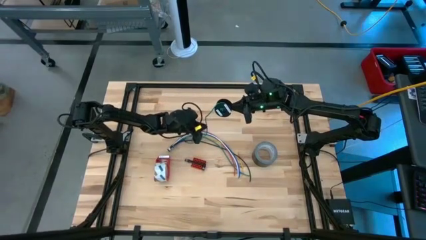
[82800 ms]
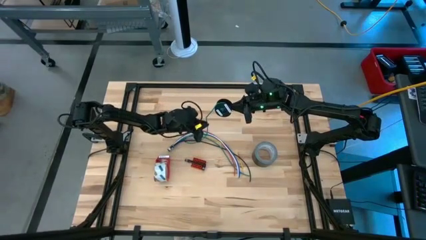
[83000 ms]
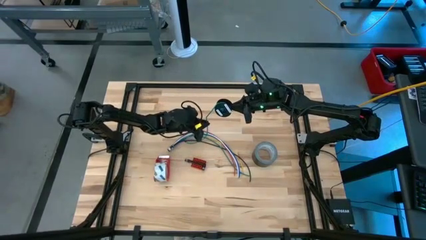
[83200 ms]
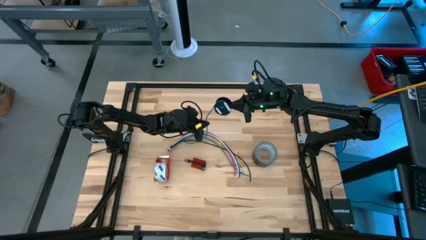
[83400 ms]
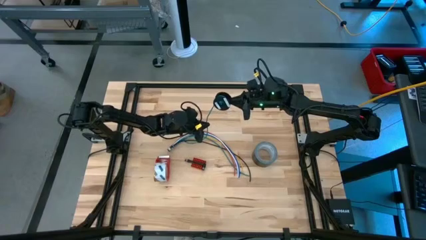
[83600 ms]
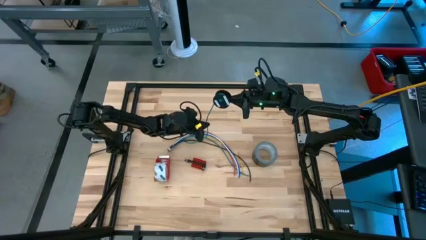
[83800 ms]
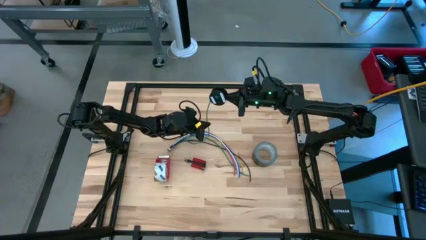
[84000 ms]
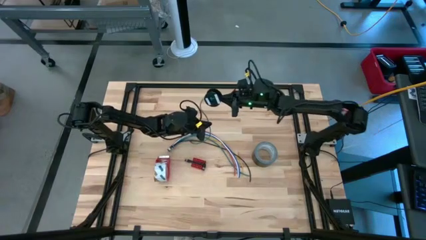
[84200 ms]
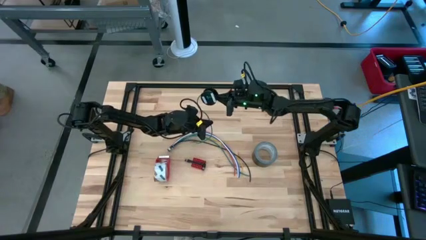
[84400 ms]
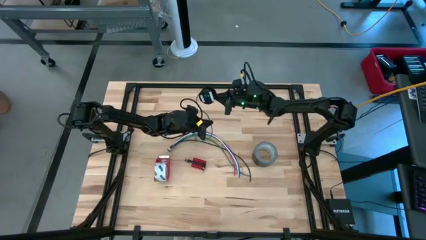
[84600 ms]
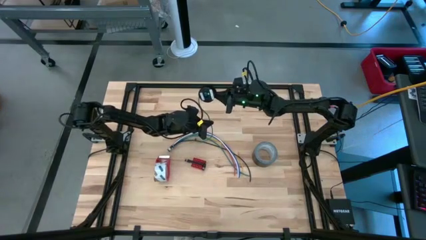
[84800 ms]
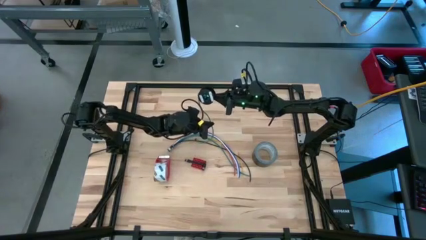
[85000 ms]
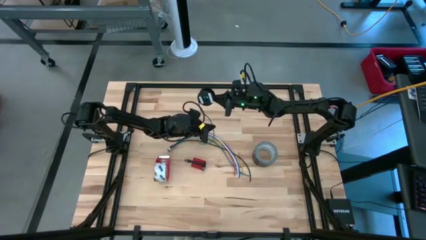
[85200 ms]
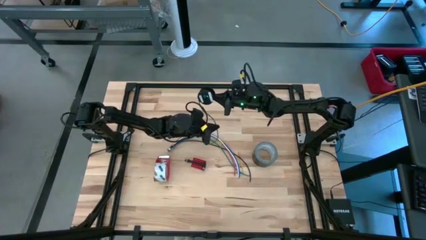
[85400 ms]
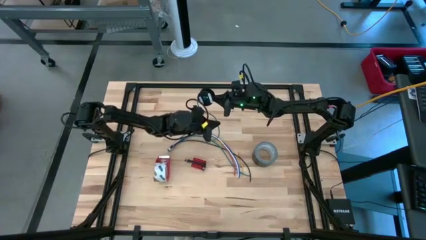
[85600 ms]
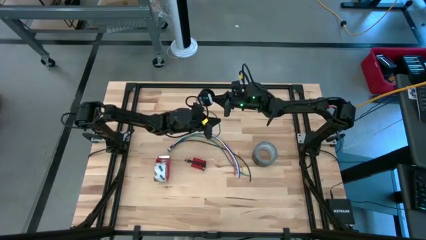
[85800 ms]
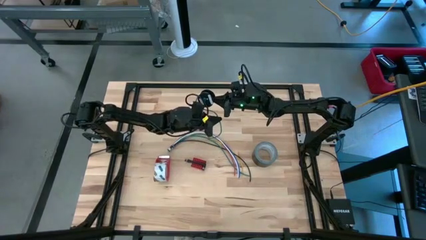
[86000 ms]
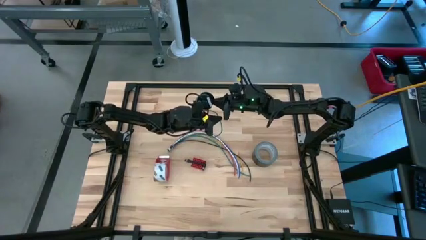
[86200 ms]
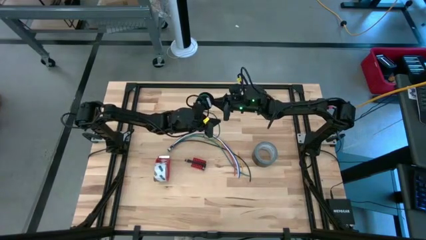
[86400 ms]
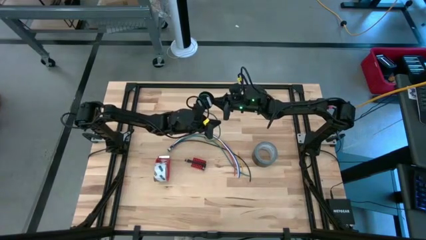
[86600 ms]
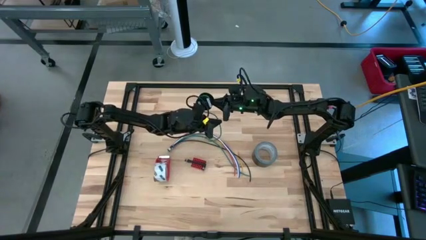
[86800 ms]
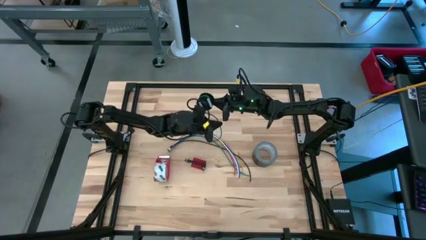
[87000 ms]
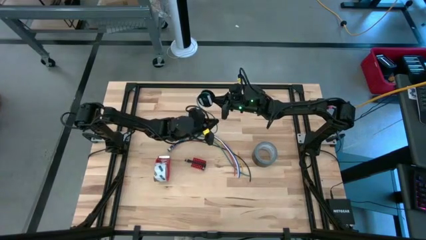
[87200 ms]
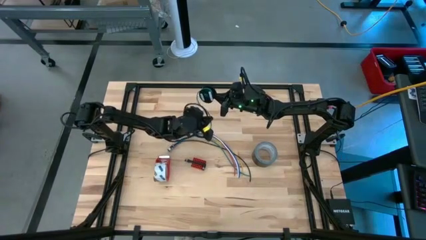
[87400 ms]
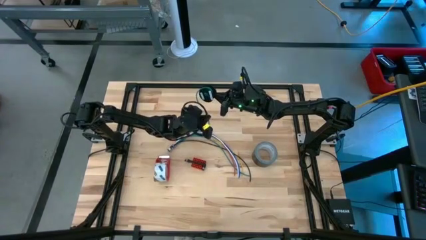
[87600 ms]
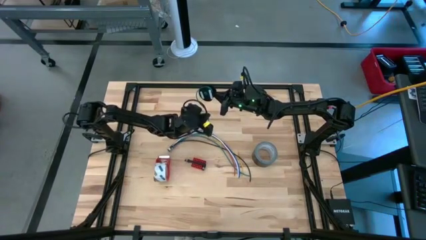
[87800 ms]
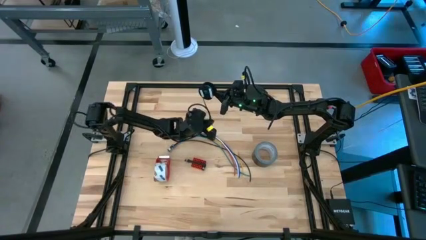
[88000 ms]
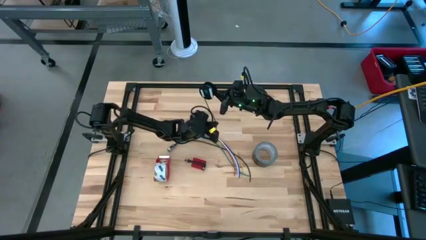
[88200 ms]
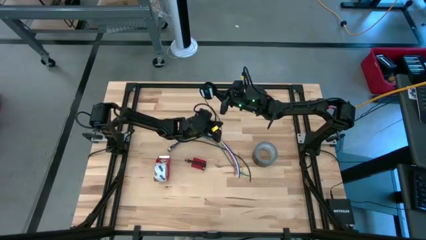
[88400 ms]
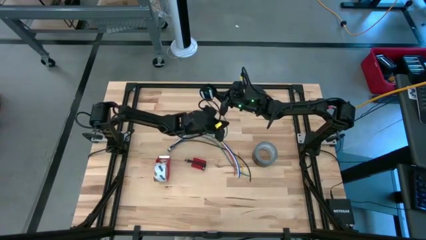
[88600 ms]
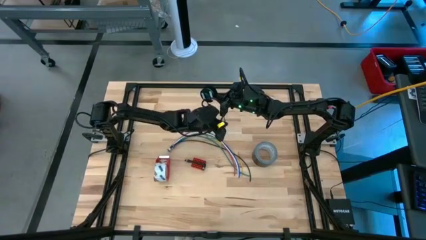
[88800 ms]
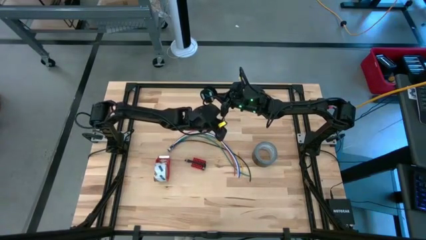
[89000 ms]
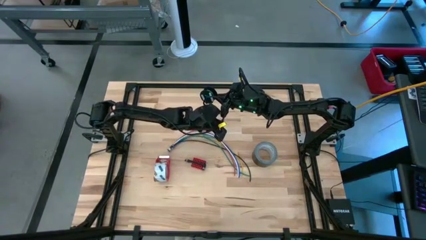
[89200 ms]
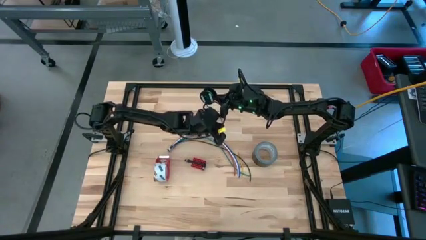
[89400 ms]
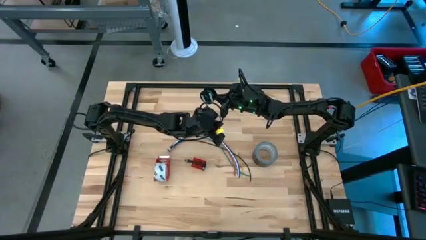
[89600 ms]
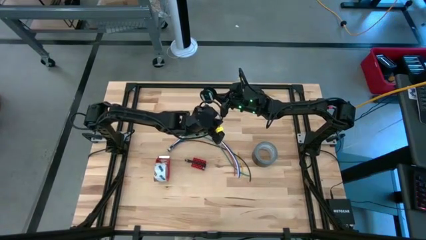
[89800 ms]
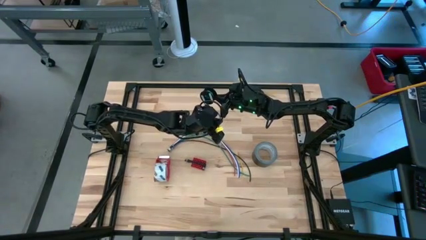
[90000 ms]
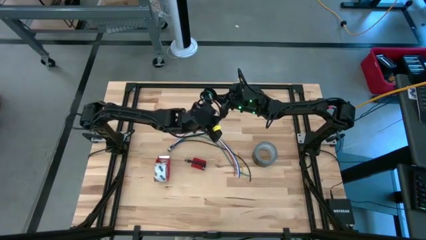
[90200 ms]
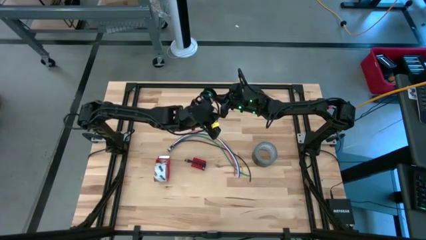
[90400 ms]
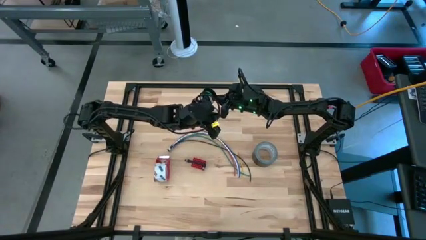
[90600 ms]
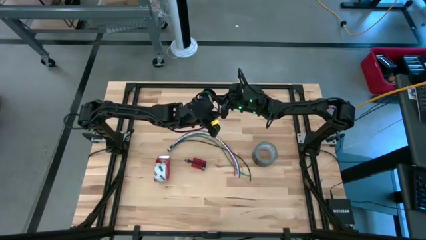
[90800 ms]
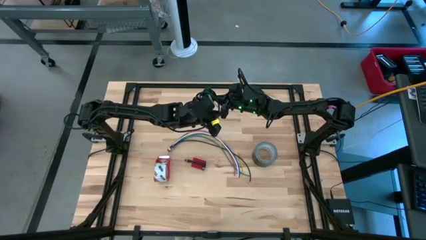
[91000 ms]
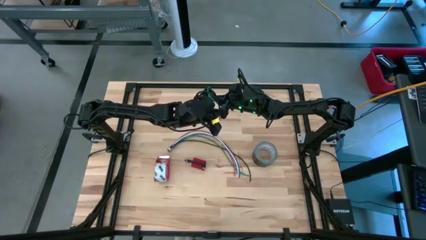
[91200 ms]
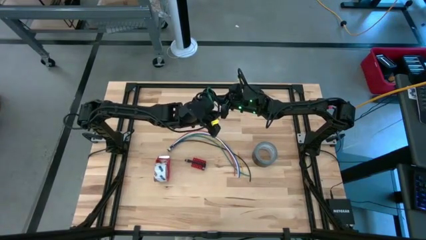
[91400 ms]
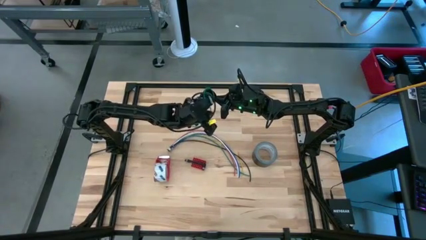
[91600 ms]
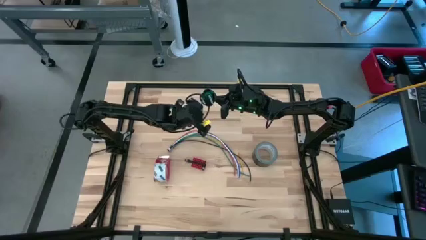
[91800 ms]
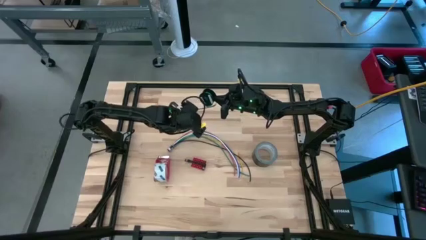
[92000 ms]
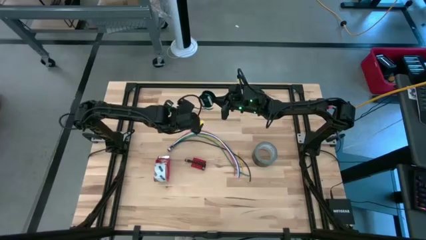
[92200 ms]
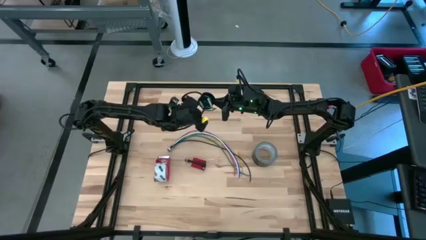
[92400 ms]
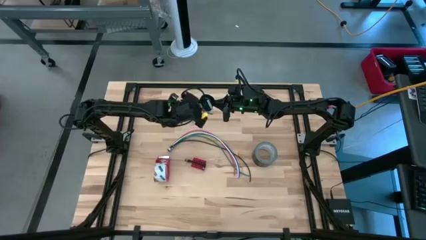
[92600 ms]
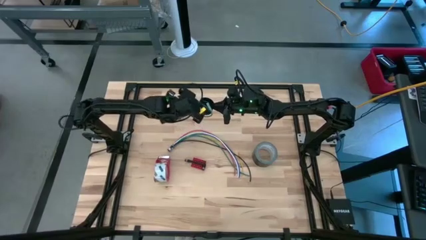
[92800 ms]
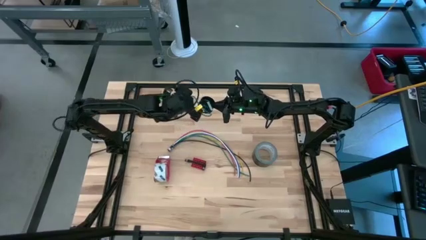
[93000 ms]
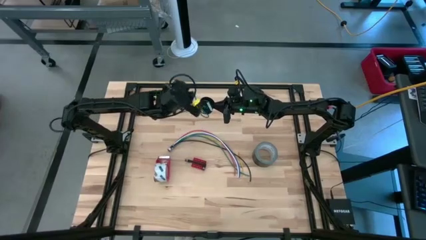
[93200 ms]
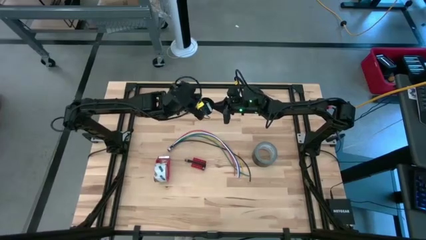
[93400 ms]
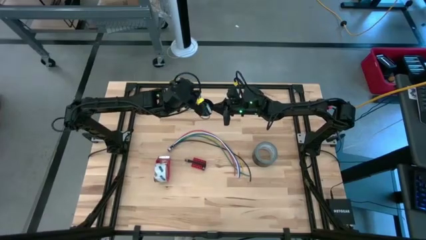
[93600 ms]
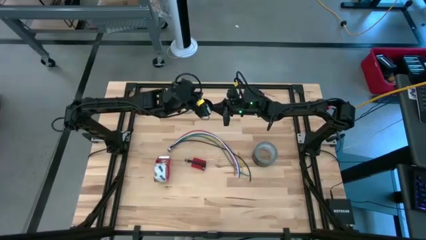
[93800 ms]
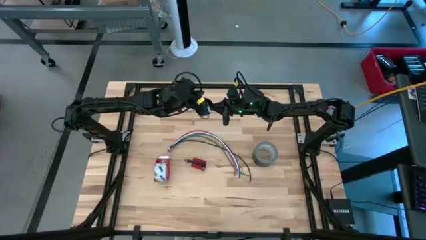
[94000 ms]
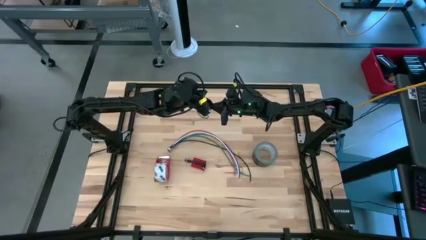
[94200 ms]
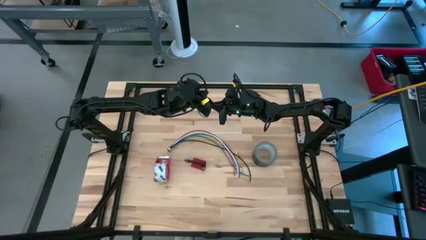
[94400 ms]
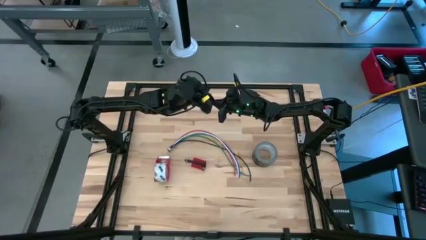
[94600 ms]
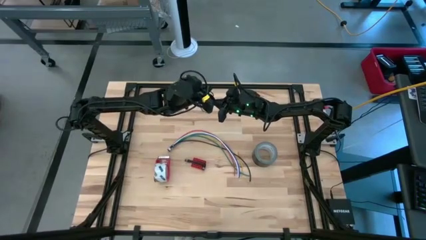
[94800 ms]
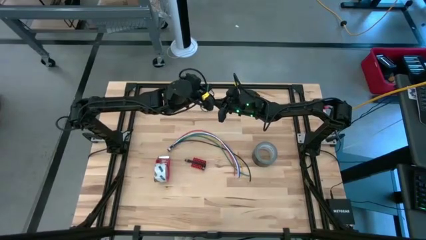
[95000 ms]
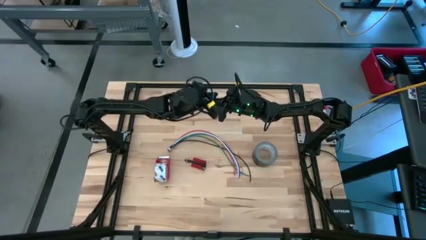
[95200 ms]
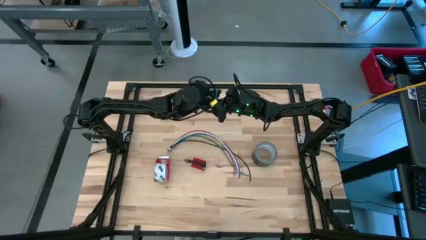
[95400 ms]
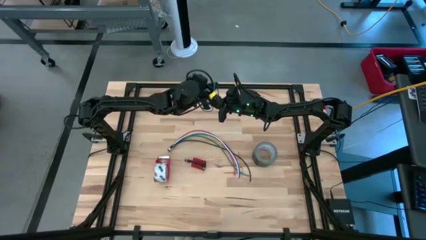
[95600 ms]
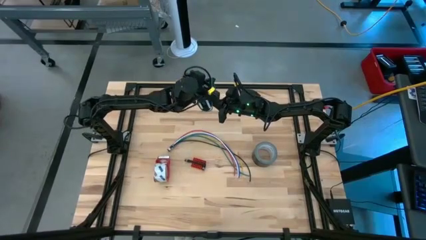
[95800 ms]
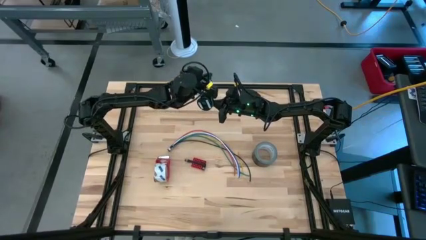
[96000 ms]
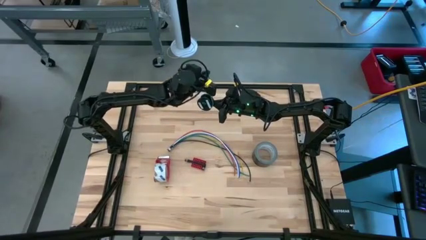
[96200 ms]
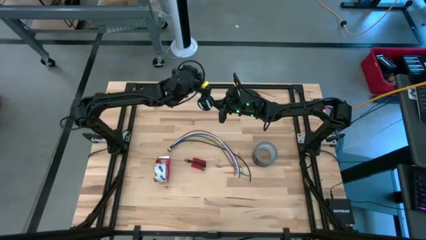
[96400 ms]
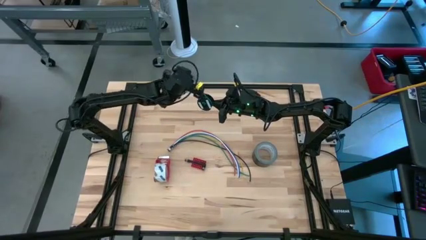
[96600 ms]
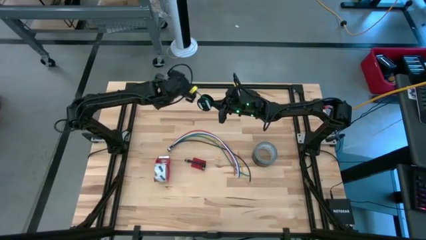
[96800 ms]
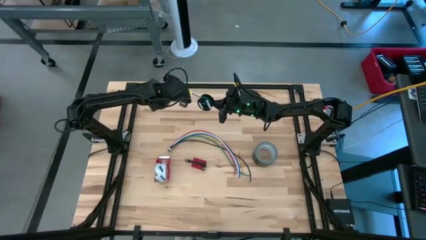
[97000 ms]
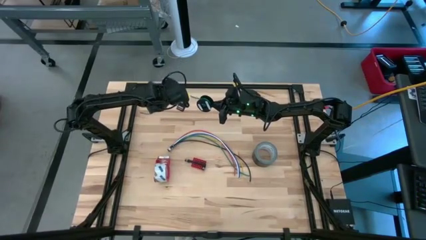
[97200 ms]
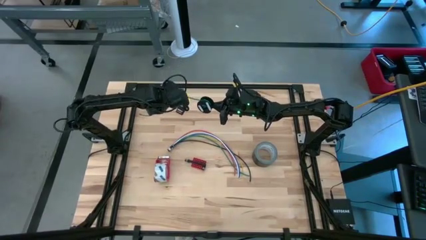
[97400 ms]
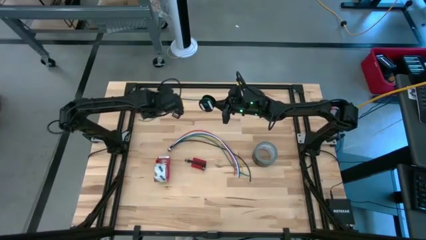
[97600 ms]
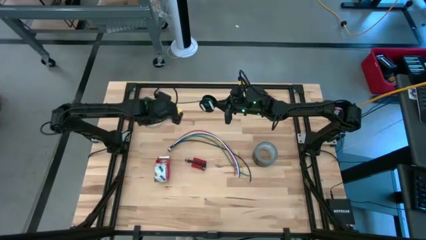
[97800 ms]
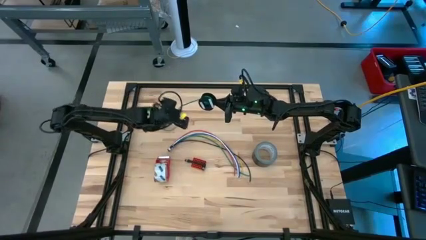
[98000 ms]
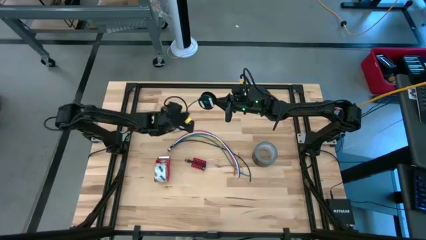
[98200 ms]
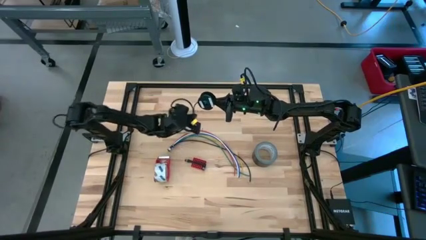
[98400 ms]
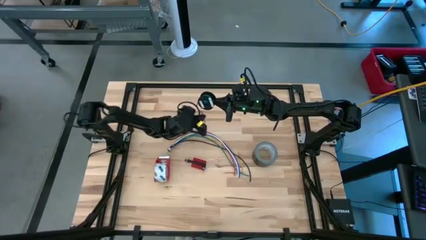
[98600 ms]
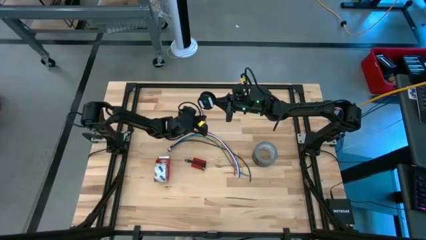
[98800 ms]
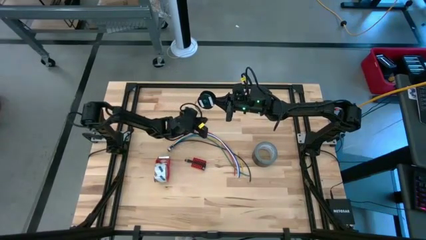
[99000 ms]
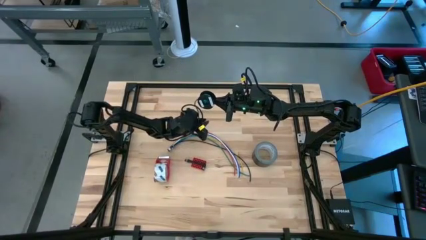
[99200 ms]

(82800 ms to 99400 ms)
Task: Coil cords
Coil the green wire onto the black spool
